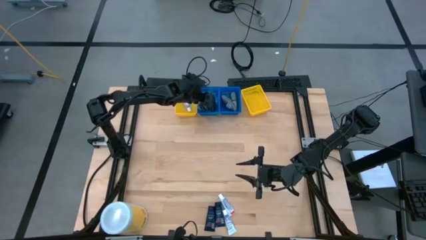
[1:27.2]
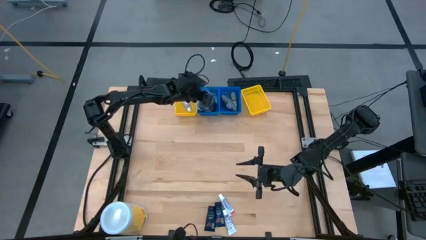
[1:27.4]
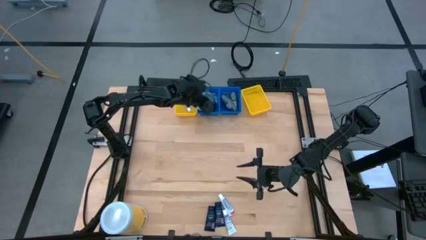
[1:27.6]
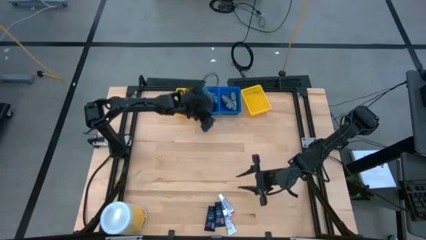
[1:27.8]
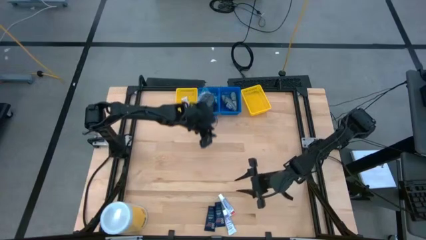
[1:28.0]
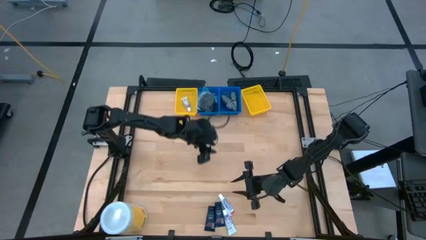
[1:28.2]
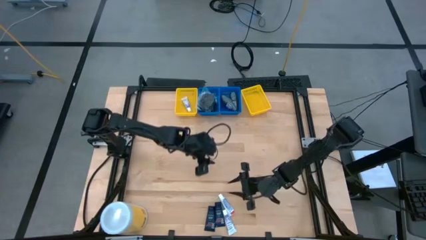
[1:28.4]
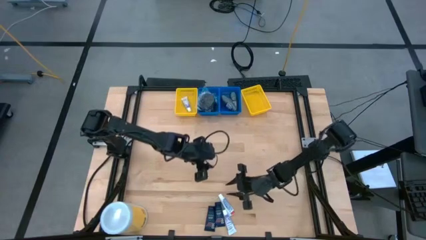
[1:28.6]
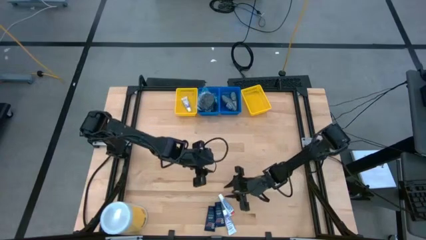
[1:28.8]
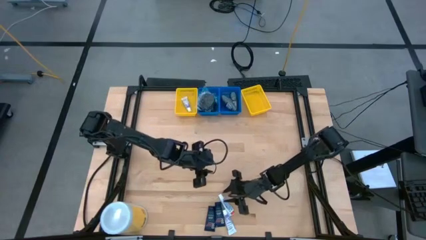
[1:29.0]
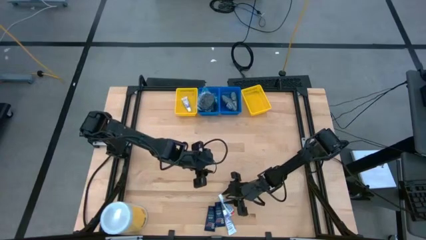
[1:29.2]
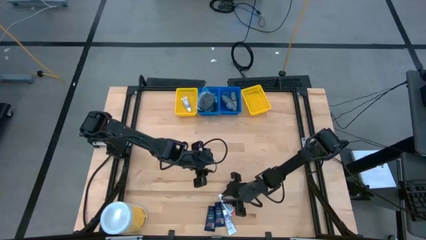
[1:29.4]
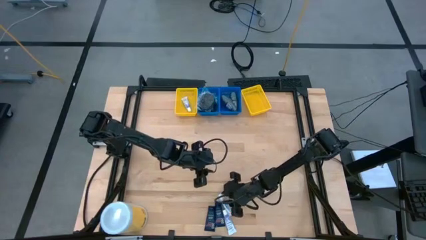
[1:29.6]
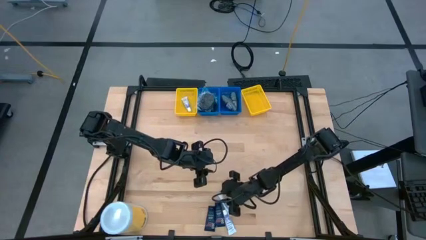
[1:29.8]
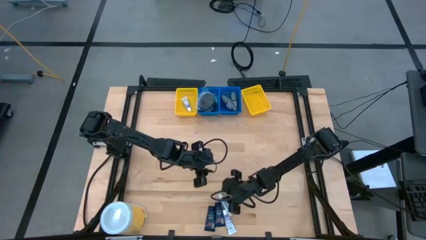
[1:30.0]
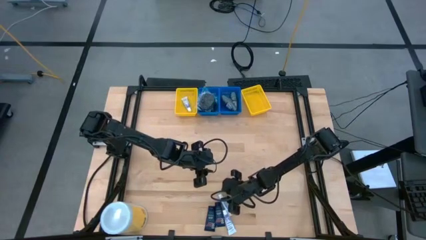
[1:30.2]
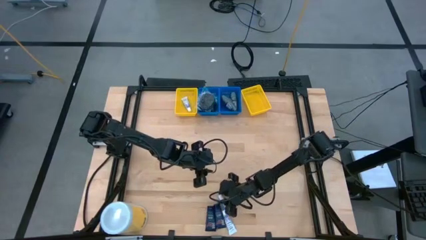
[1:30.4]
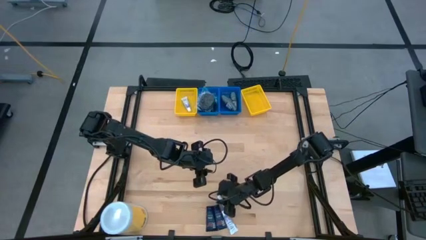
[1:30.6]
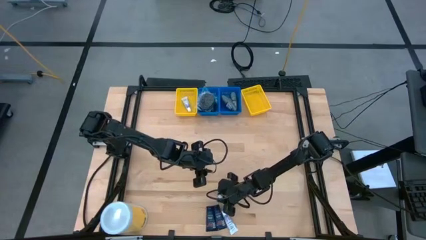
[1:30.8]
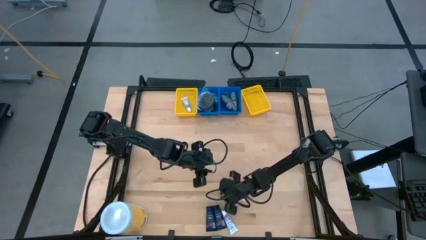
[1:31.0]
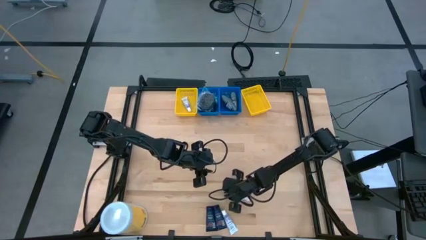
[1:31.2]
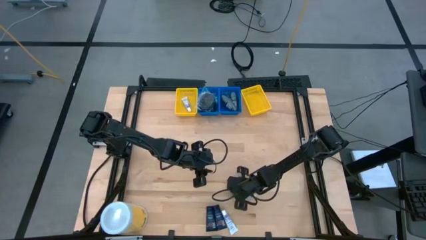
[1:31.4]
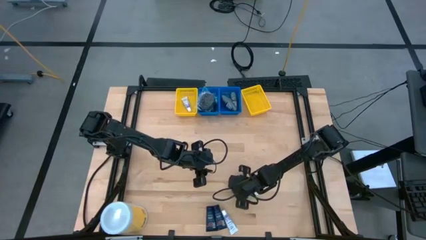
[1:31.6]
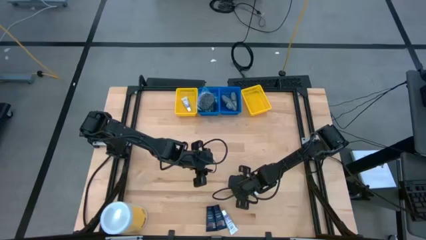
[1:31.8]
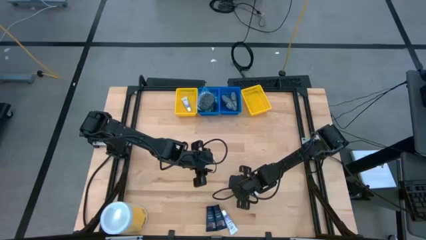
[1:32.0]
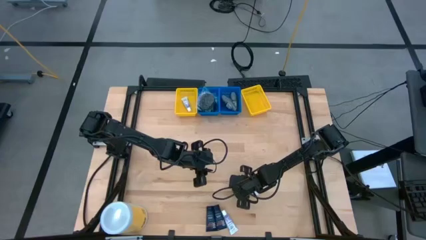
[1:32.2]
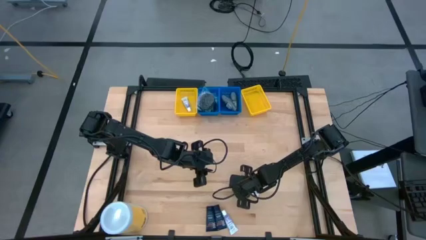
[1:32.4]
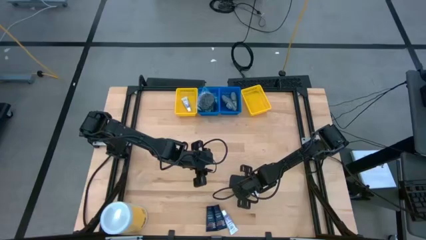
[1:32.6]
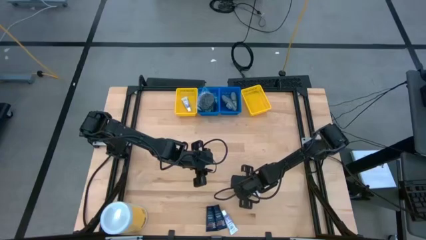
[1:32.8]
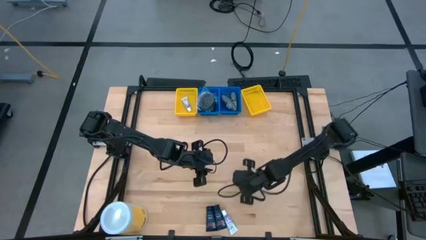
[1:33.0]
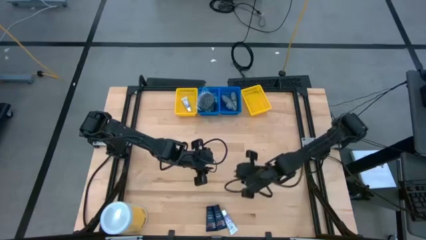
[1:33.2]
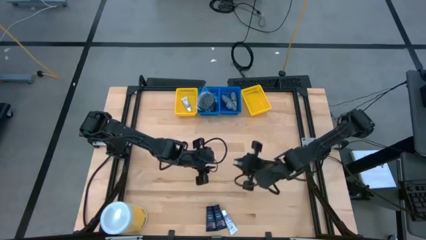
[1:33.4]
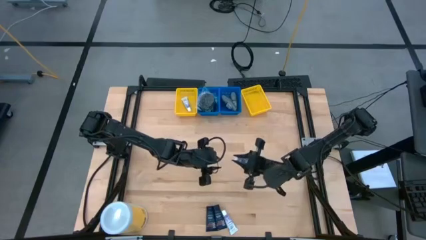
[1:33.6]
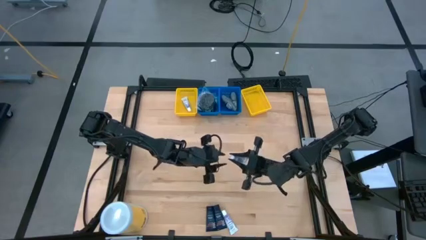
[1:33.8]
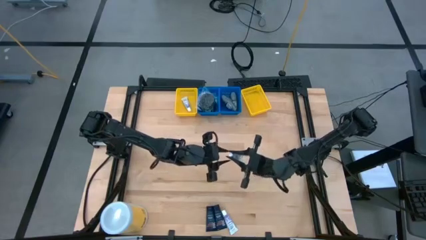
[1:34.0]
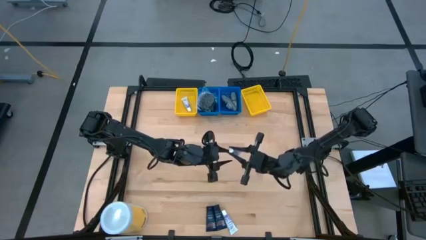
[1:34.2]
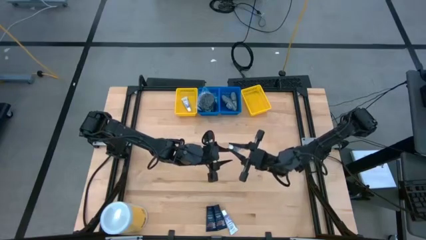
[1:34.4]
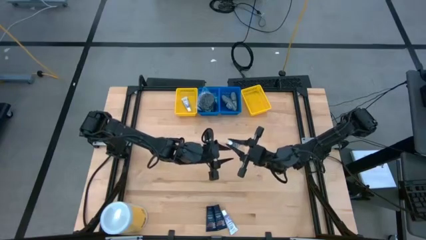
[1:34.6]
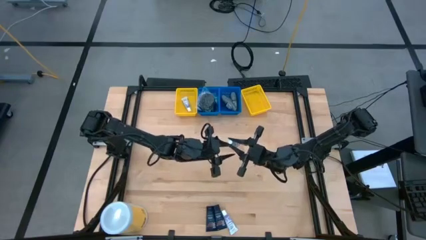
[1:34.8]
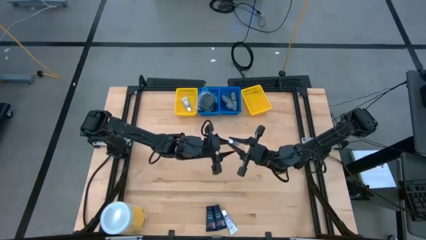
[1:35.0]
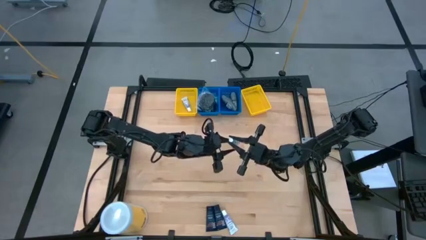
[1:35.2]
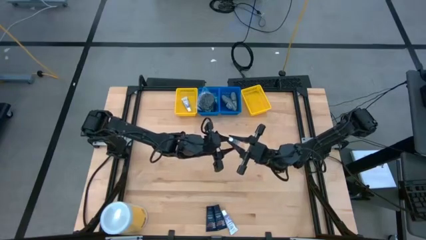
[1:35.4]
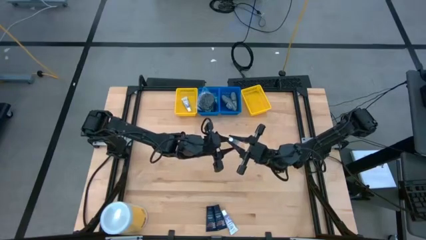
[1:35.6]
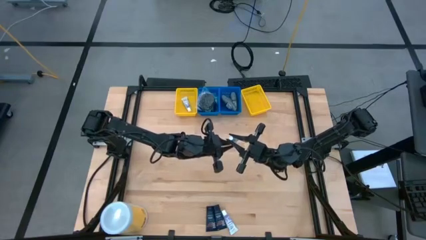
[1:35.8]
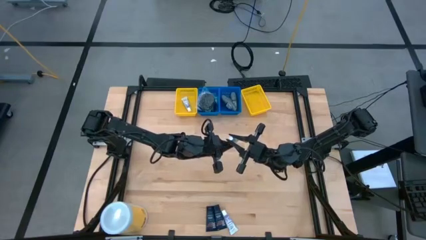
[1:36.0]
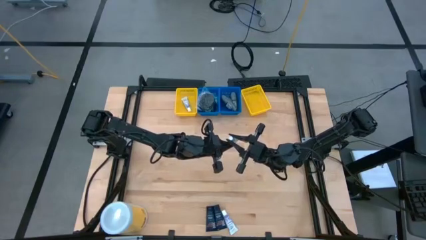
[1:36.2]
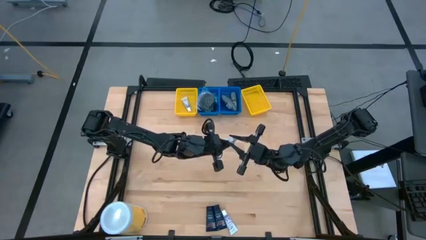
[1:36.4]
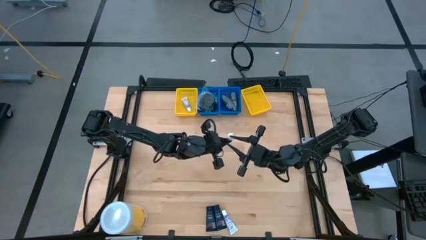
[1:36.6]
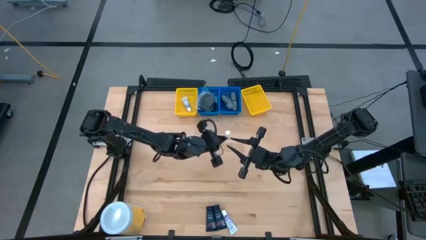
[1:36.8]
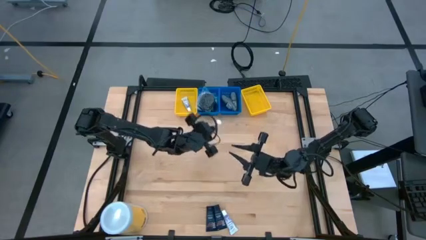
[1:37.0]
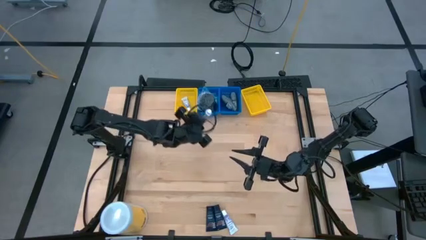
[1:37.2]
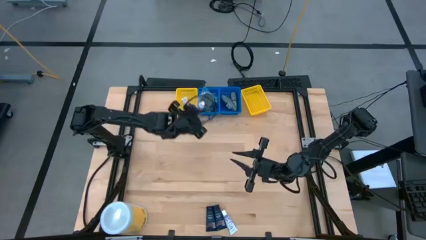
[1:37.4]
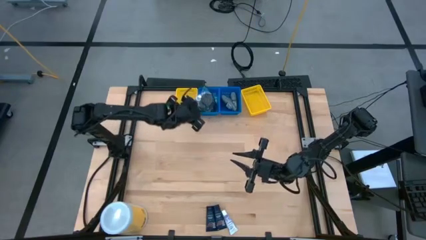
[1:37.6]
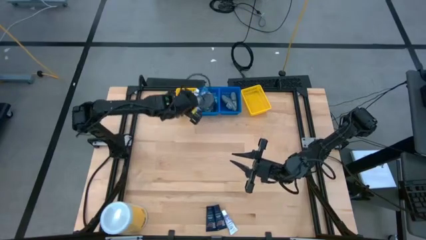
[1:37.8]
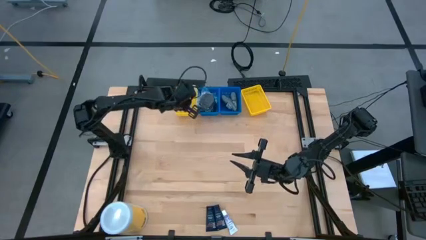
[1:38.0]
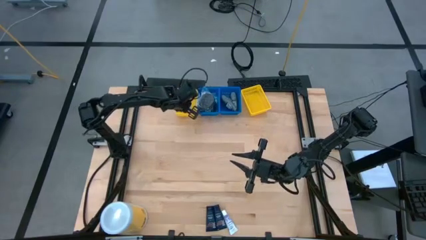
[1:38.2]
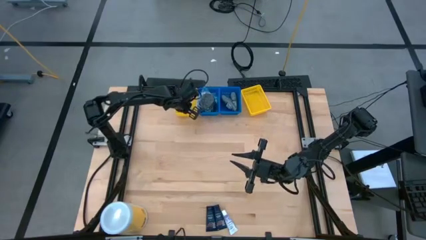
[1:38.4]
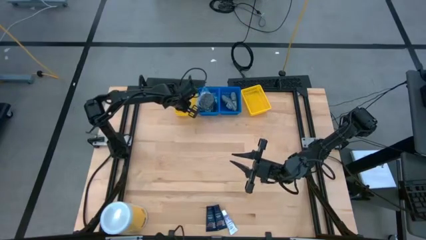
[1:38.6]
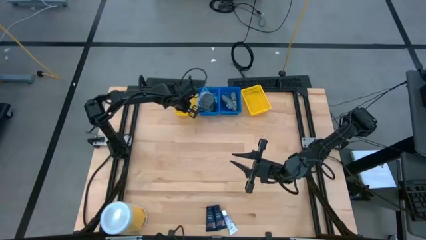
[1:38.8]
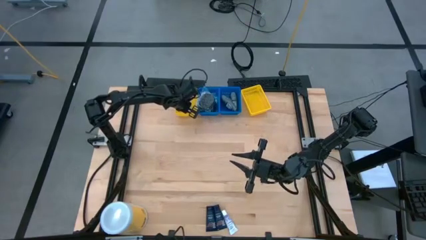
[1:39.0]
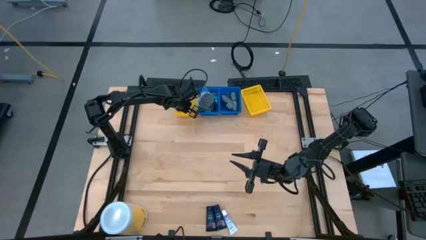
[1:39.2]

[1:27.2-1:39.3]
Task: Pick & Place Travel size toiletries
Put the top toothpaste into the left yellow bin

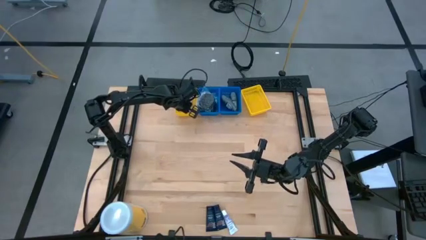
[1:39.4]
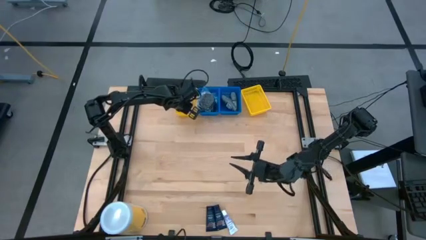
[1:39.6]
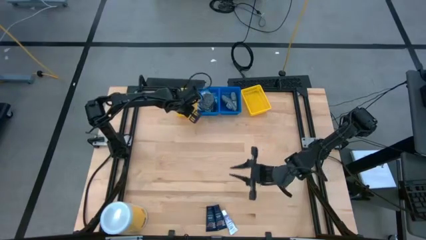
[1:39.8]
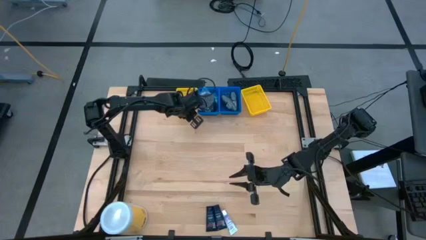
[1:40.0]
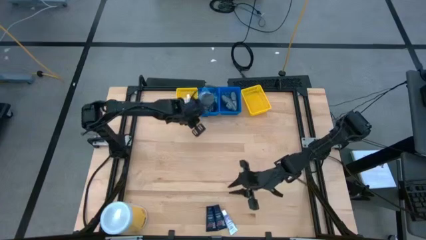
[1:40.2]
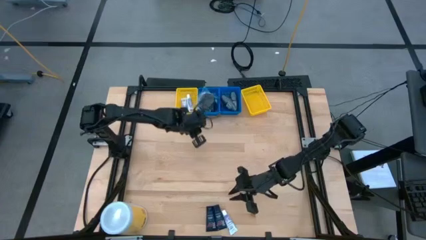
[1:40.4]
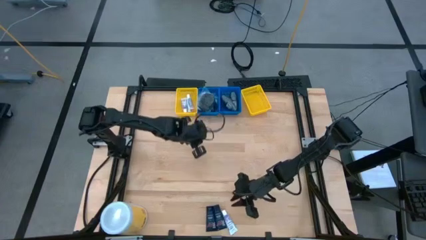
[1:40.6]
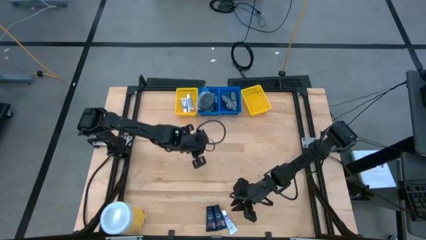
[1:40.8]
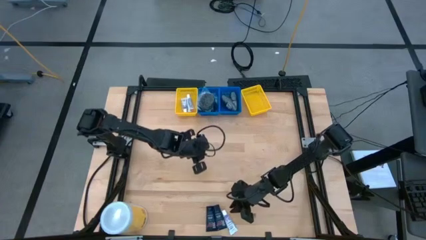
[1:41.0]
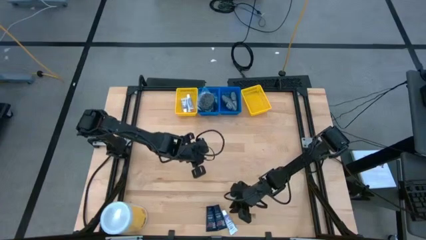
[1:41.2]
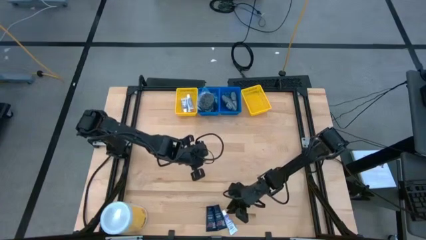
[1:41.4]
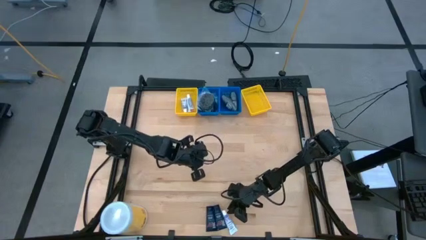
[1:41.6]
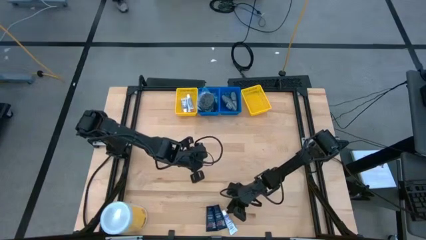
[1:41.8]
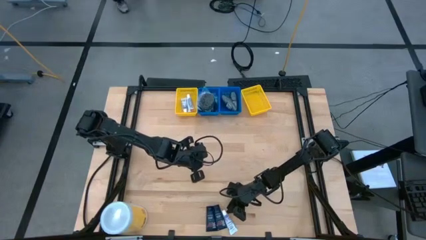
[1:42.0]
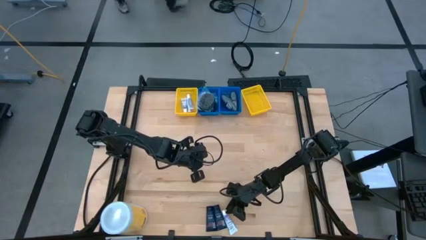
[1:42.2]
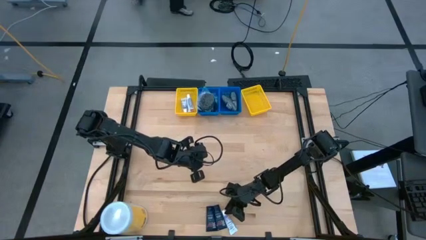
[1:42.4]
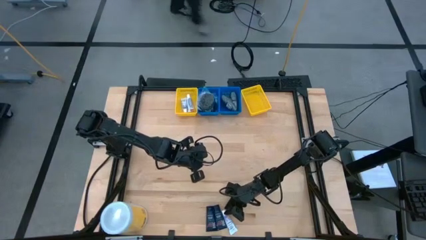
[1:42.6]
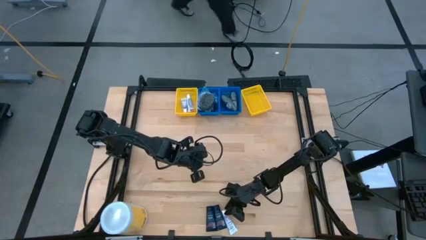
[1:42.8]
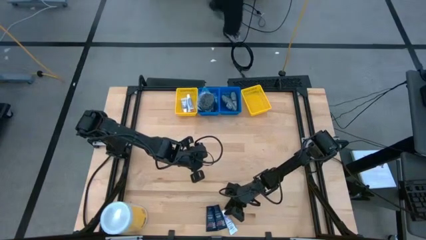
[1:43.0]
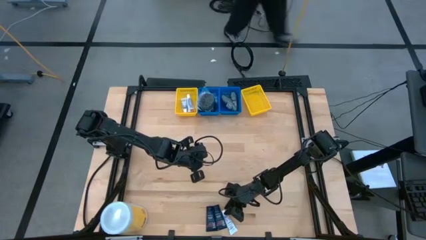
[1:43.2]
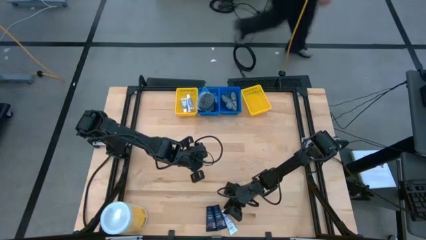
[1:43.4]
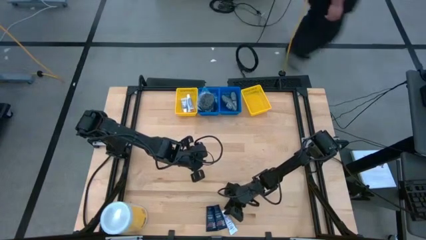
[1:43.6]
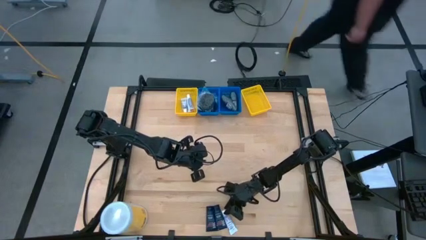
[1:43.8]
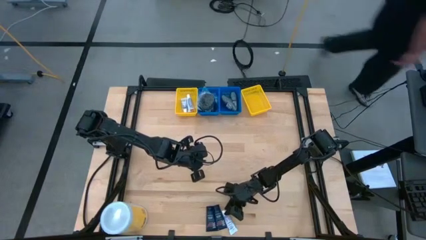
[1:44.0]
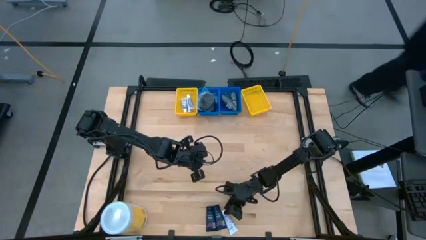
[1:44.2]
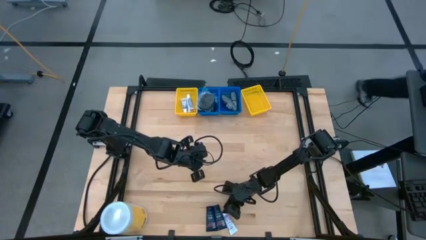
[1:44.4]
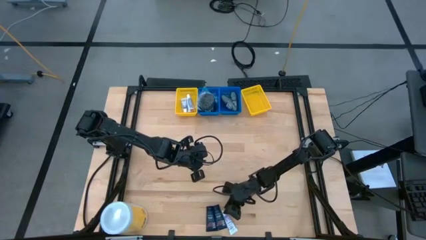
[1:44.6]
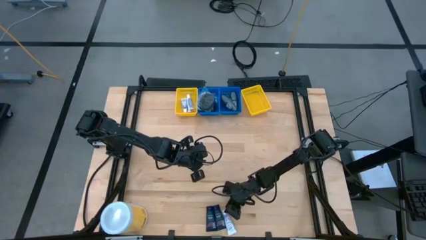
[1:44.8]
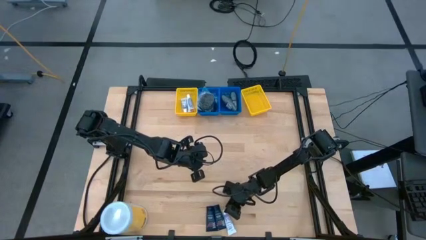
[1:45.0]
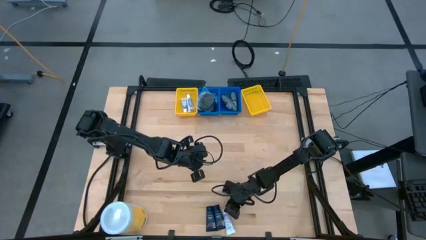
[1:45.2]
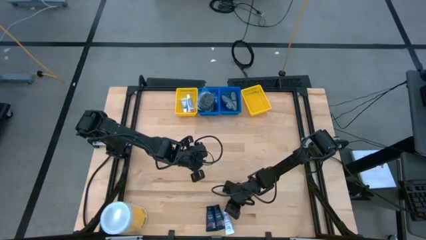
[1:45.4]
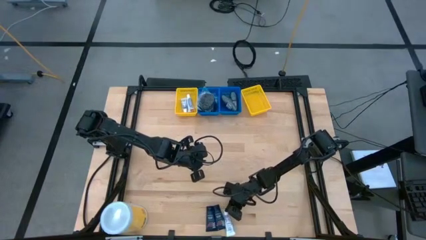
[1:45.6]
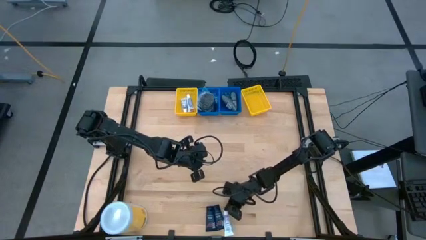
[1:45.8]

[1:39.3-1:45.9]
Put the toothpaste into the left yellow bin
